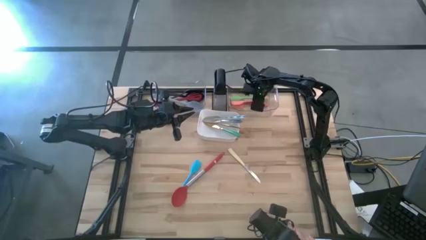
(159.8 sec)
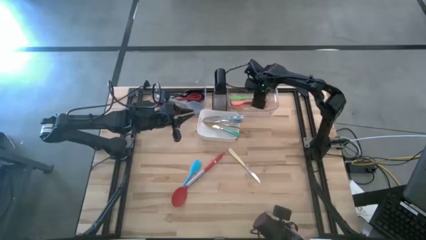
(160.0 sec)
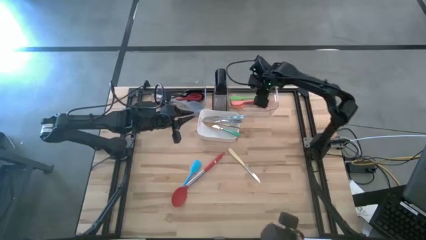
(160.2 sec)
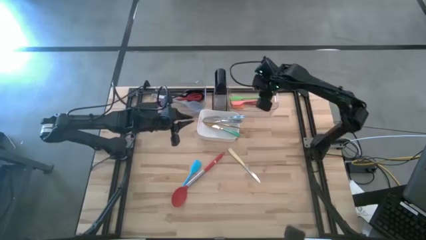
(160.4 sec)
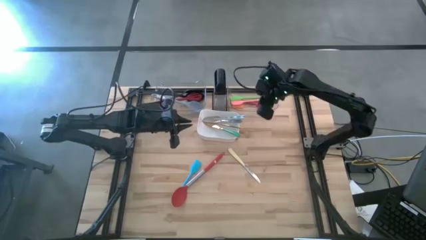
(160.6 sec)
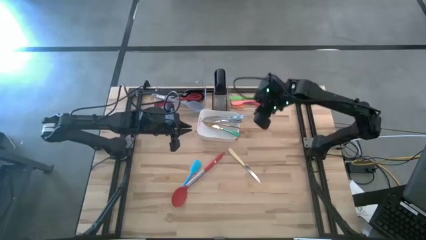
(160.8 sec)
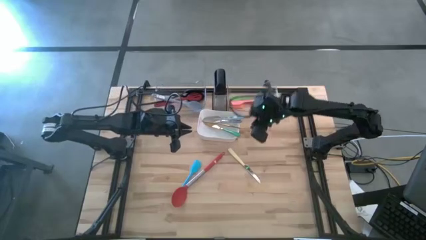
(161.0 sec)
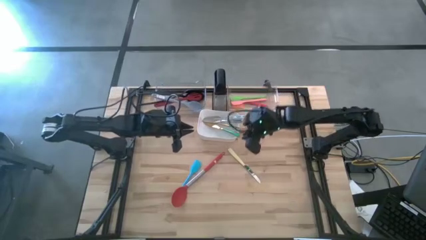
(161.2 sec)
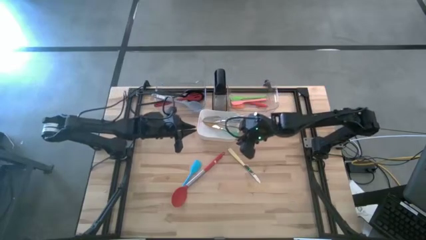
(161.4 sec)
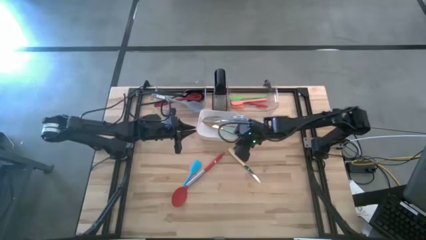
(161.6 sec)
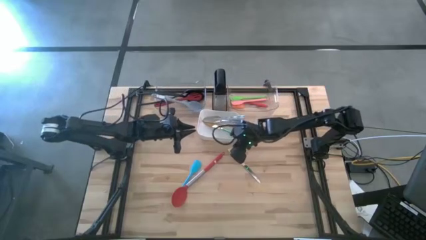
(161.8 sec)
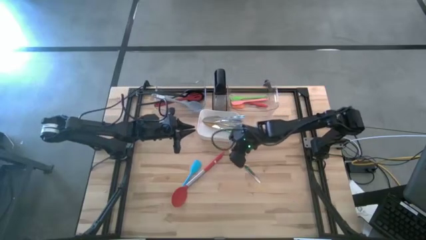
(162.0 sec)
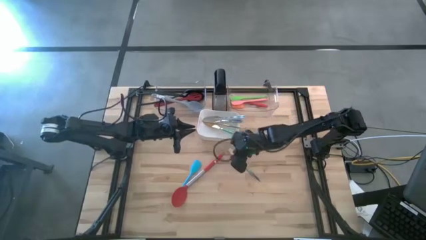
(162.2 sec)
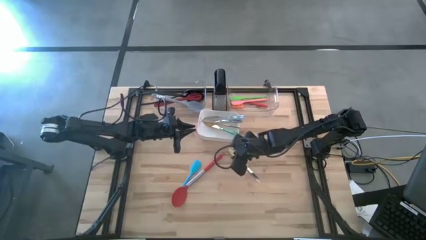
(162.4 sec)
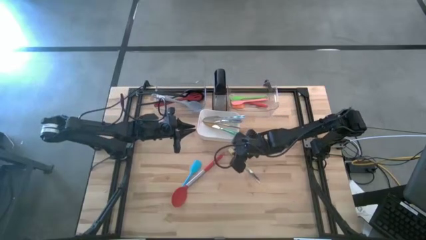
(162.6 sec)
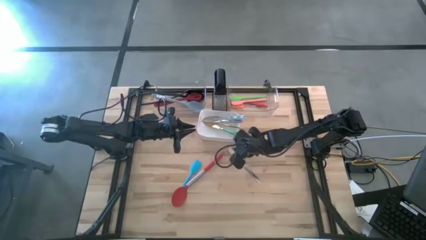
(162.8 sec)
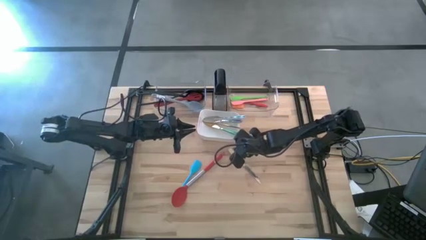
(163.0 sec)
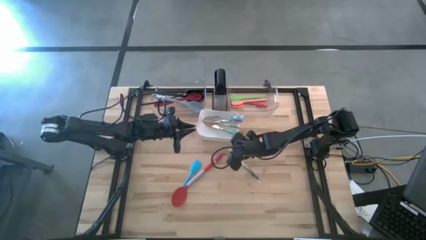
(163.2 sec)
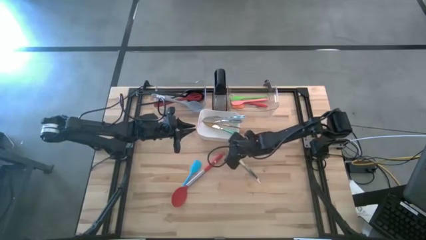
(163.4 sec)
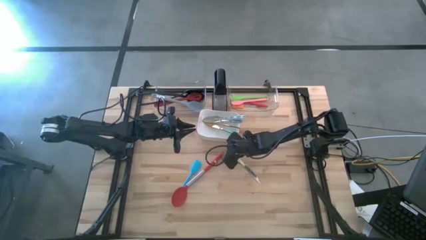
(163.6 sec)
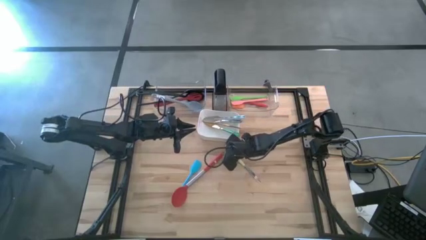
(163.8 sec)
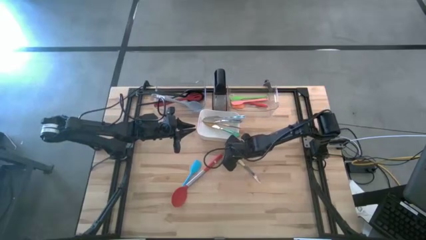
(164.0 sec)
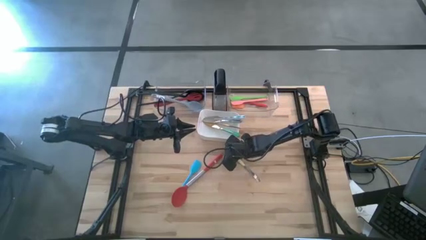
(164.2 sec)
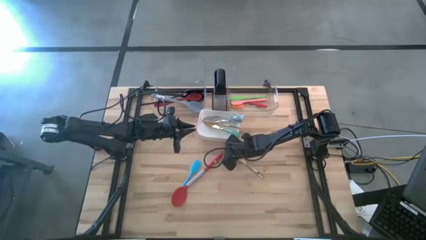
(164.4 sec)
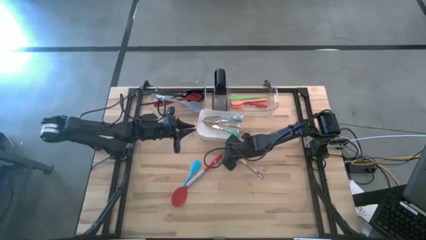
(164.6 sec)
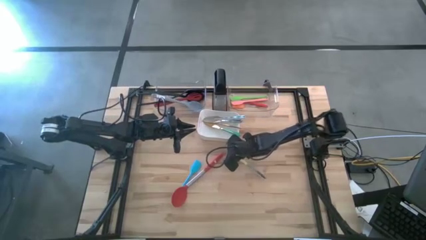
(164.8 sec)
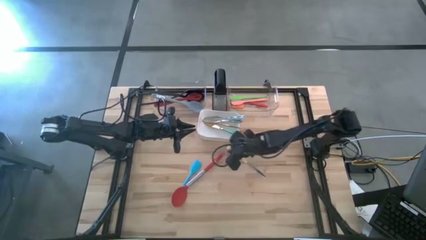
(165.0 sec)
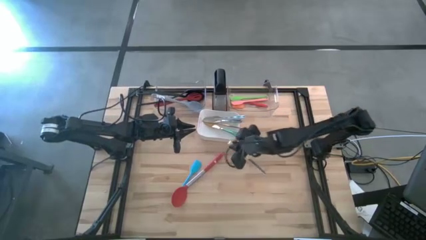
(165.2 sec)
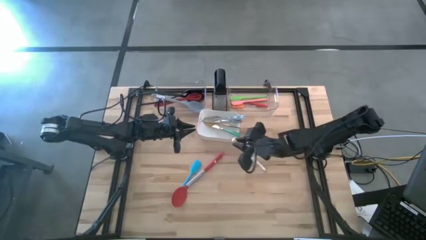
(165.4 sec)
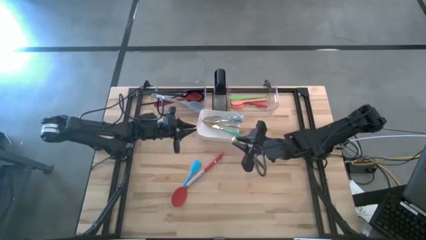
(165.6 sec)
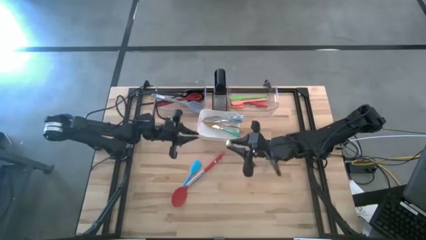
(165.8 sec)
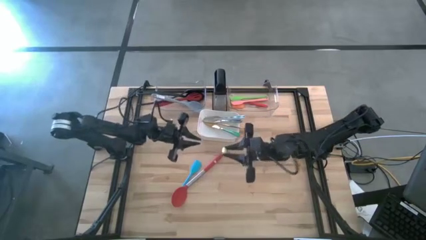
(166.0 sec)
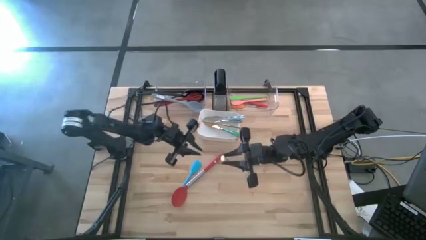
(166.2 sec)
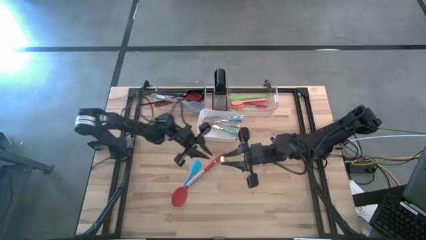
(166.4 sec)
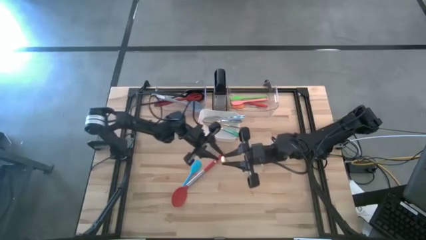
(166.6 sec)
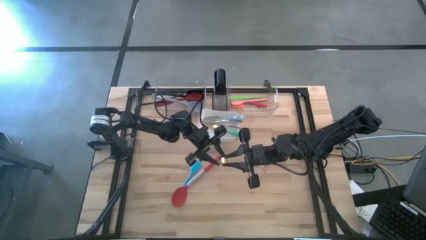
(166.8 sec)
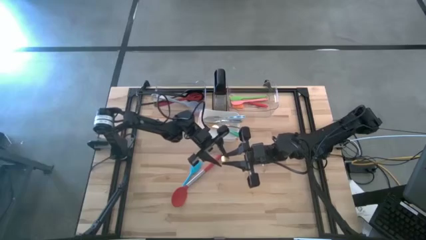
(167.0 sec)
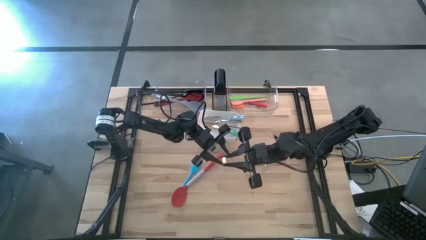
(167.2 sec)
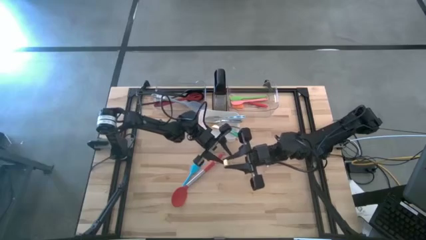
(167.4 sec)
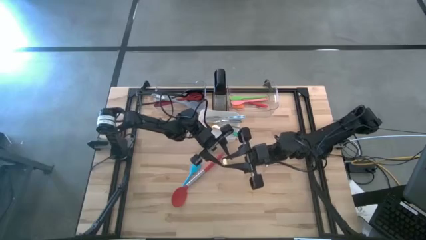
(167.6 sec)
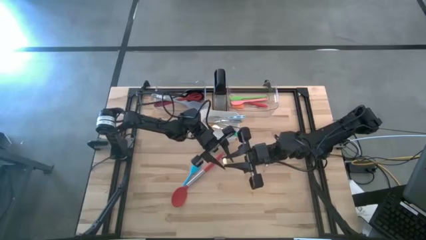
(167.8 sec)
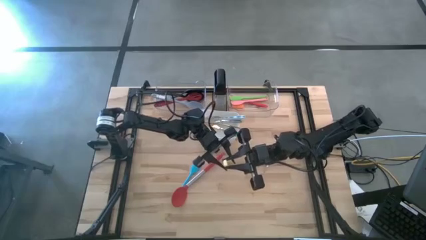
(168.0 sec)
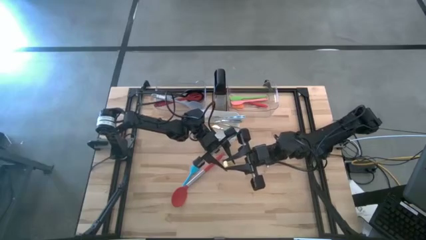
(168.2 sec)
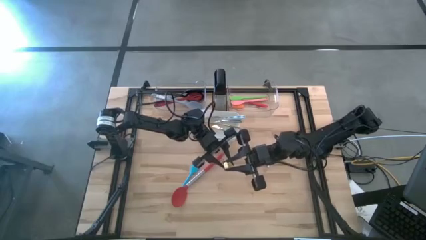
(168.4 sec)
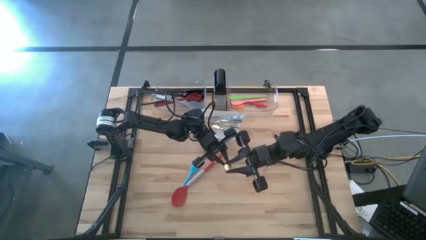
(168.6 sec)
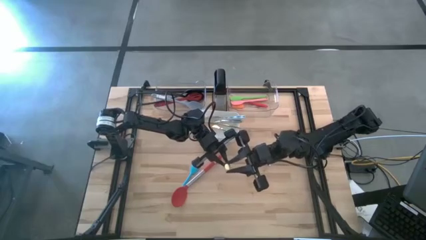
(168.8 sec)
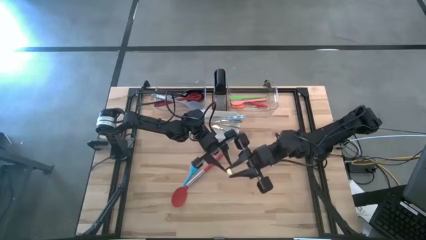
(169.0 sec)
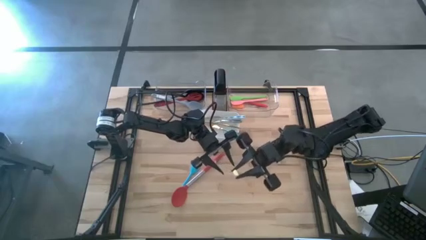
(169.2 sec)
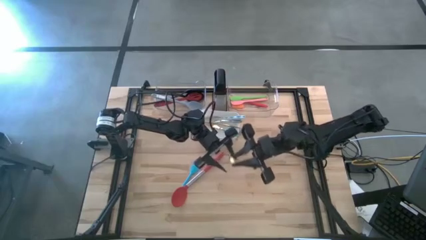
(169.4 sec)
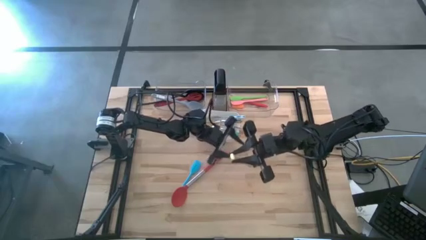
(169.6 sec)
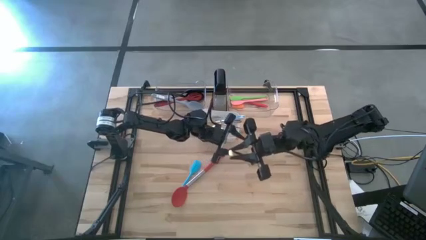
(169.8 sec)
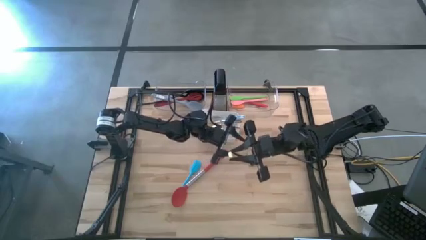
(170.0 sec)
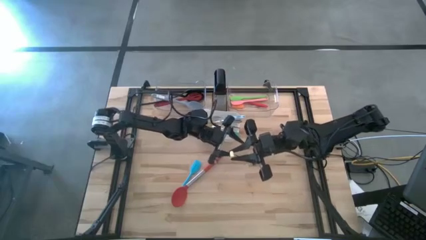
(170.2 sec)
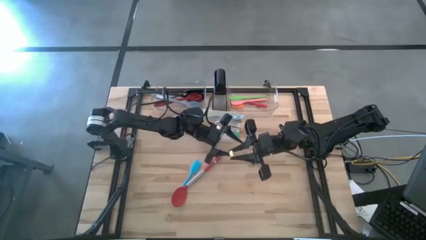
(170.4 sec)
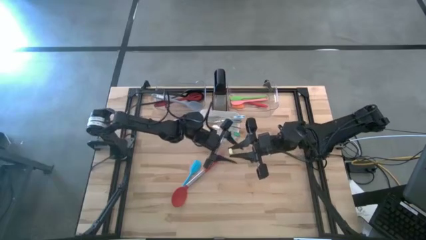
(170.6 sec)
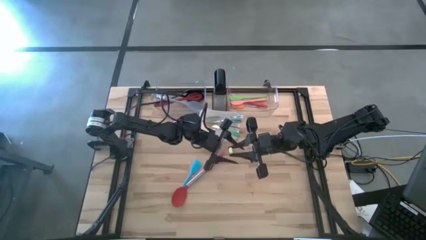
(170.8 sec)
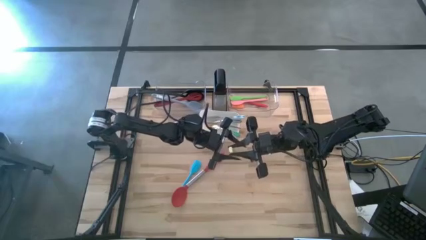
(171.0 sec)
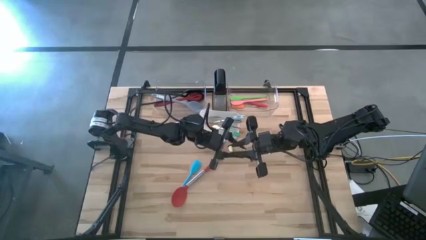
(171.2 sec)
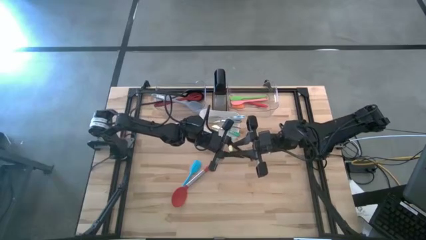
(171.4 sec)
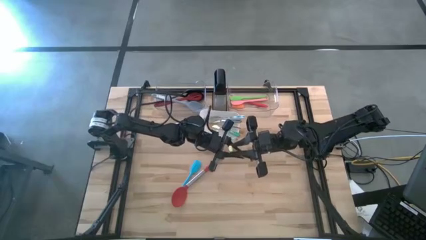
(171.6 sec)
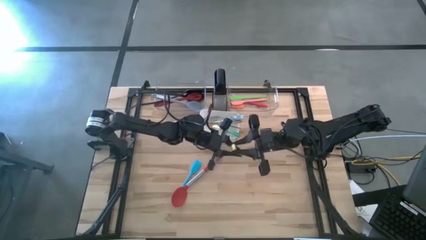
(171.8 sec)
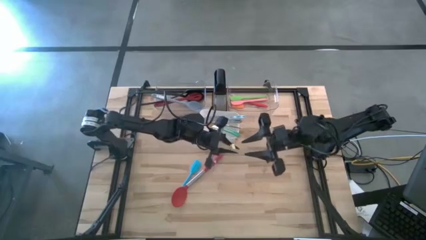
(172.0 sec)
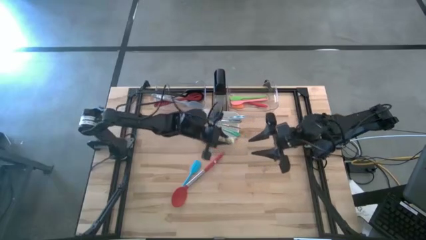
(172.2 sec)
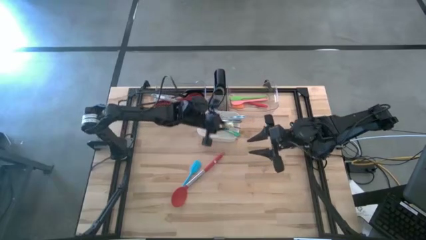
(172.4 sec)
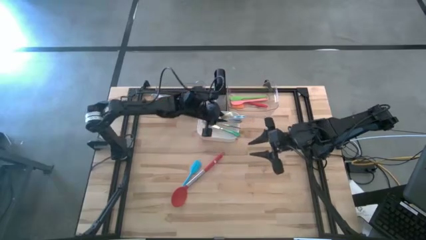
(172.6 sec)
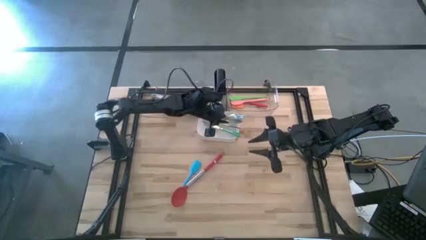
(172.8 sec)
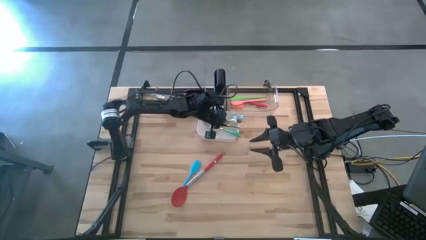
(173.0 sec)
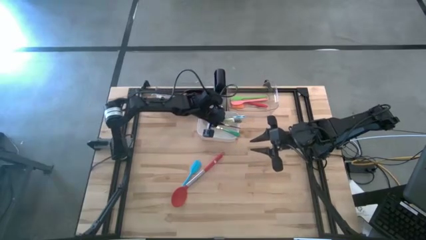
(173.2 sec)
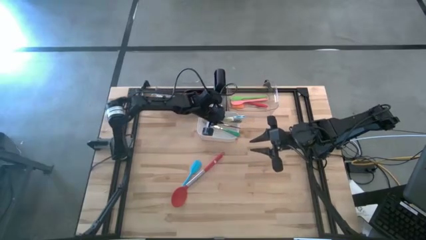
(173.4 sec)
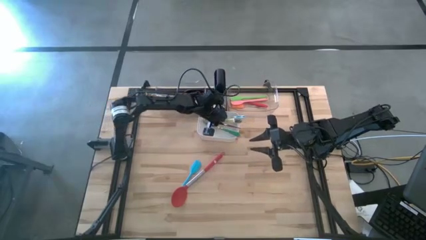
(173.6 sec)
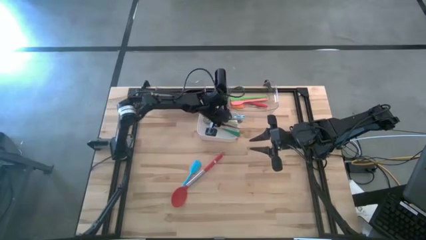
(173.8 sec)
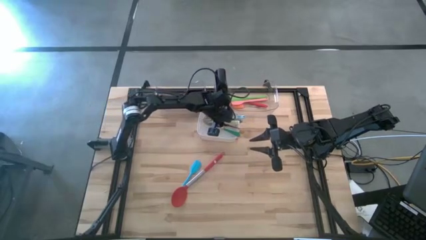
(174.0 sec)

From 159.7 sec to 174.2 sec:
Task: Pick & Place Kitchen Items
Put the yellow table knife into the white bin
